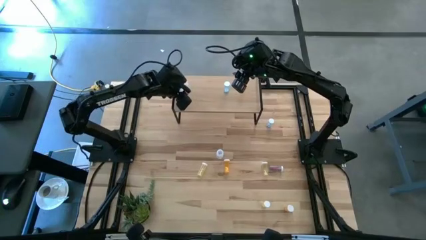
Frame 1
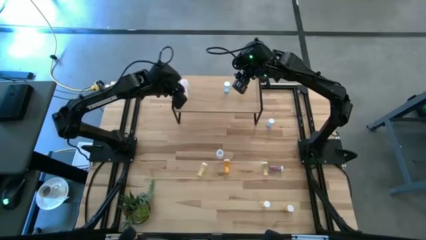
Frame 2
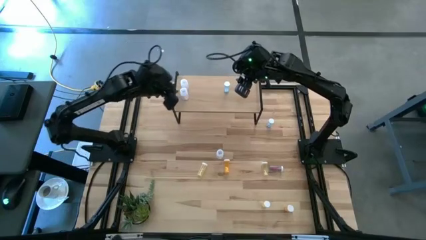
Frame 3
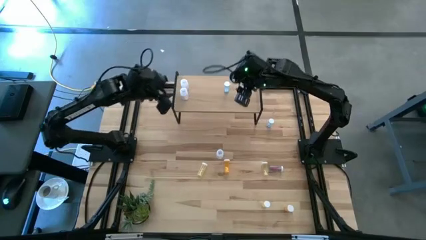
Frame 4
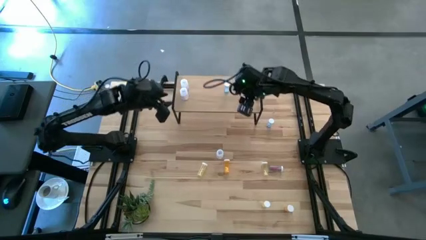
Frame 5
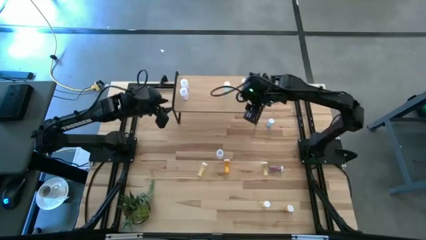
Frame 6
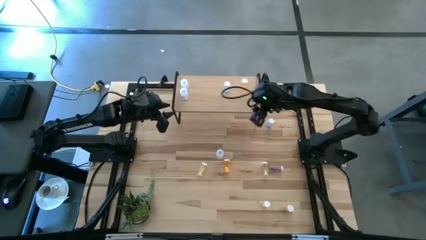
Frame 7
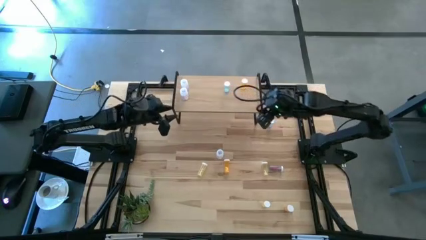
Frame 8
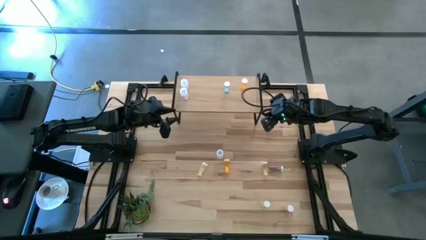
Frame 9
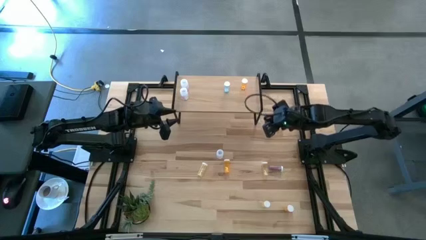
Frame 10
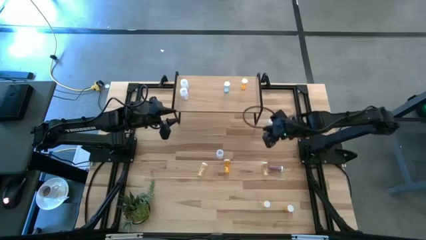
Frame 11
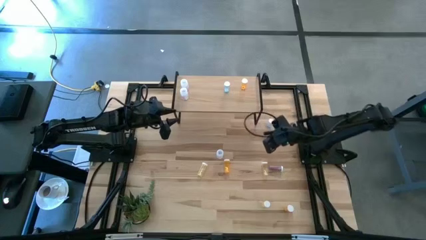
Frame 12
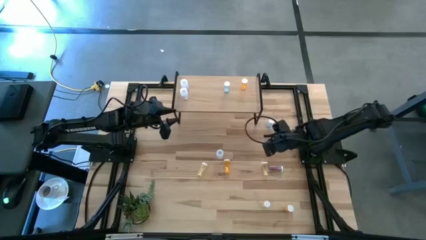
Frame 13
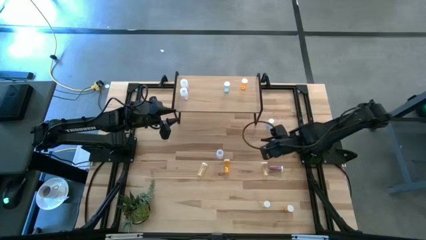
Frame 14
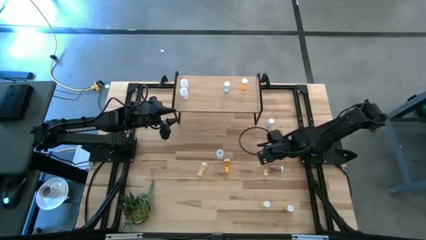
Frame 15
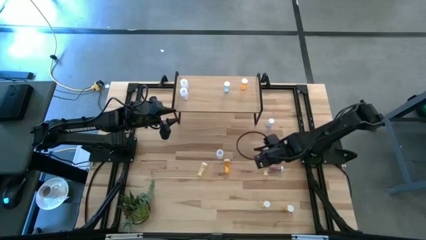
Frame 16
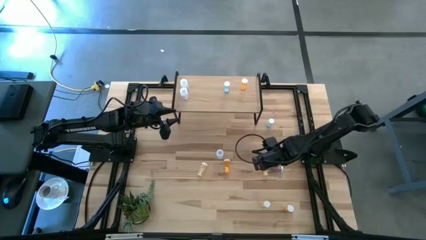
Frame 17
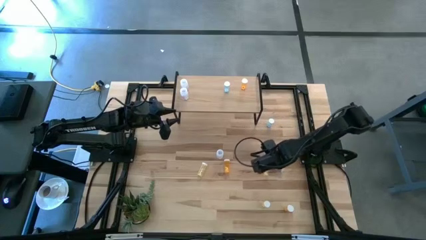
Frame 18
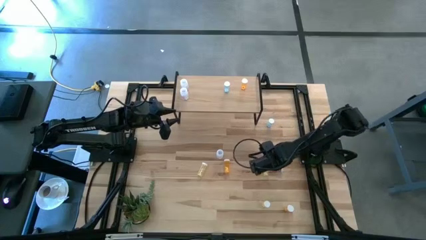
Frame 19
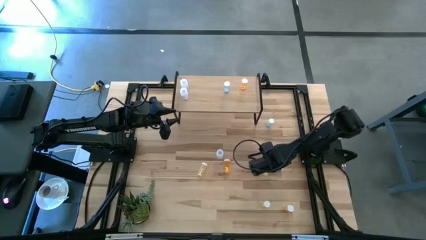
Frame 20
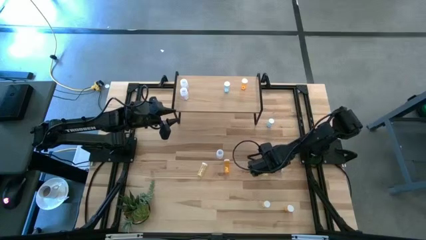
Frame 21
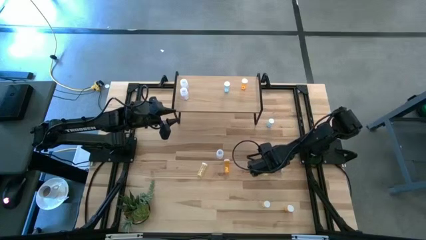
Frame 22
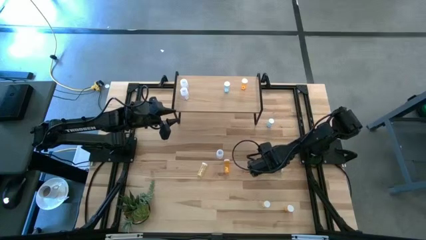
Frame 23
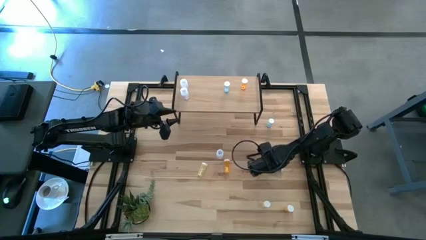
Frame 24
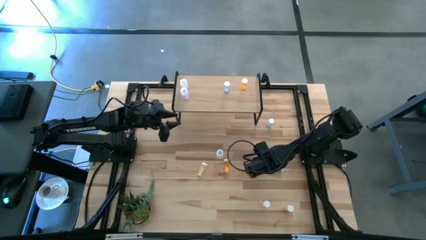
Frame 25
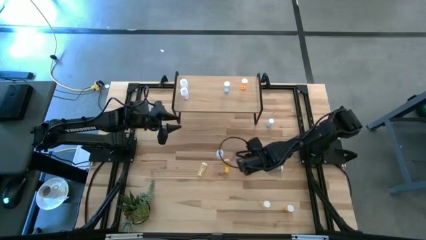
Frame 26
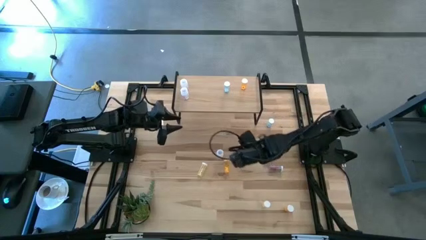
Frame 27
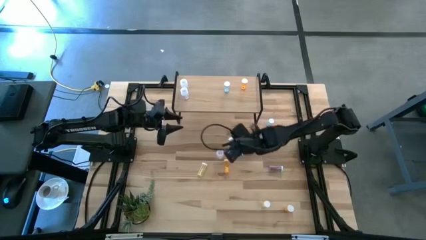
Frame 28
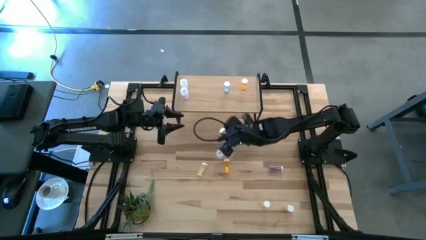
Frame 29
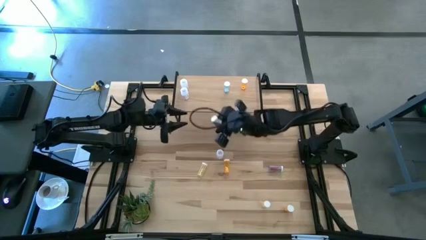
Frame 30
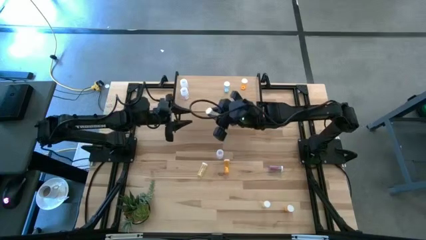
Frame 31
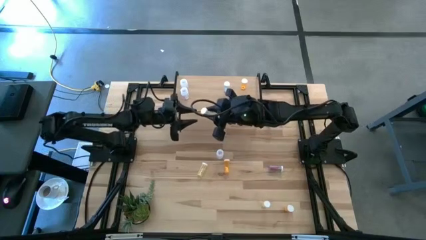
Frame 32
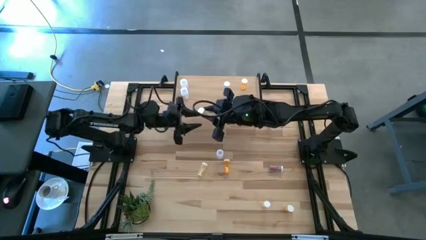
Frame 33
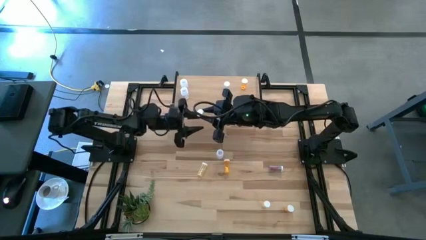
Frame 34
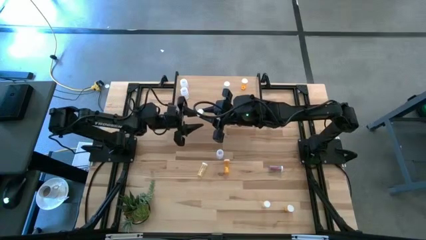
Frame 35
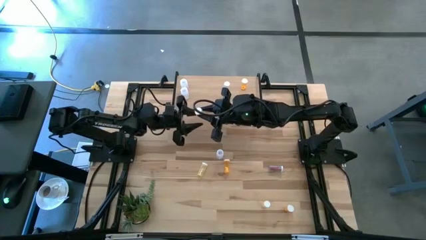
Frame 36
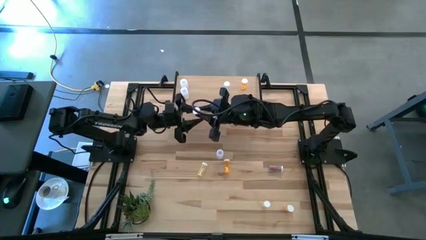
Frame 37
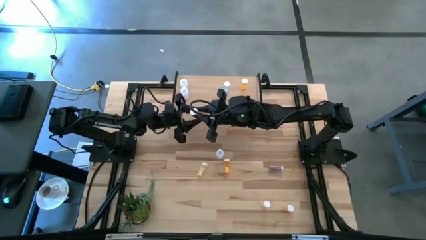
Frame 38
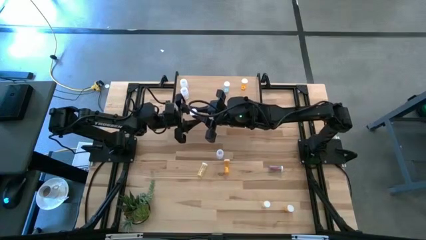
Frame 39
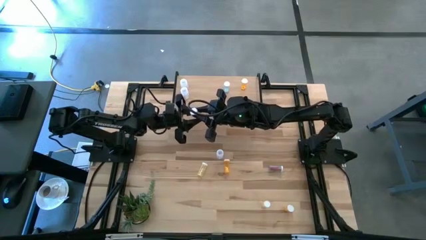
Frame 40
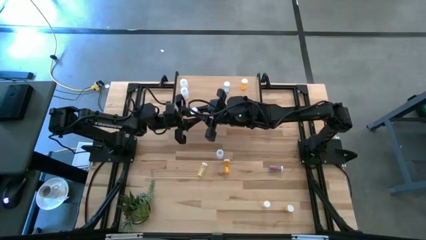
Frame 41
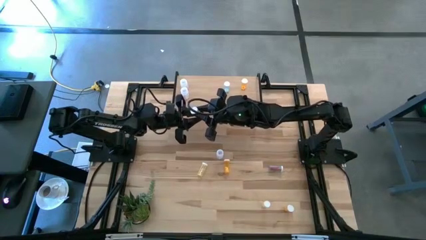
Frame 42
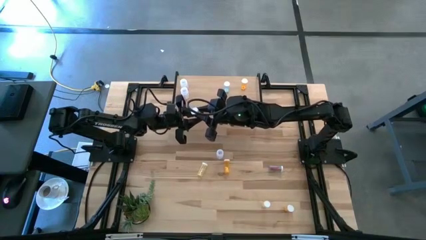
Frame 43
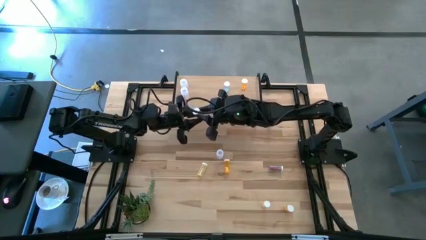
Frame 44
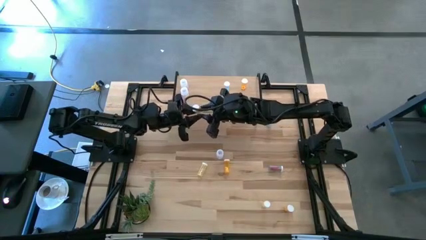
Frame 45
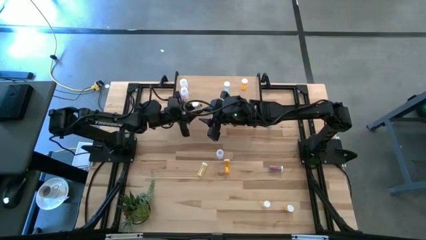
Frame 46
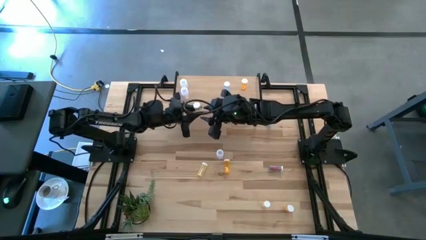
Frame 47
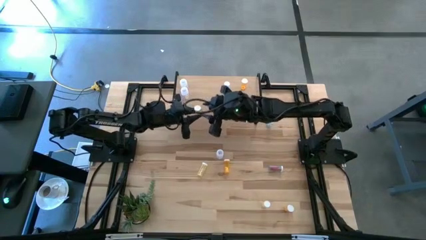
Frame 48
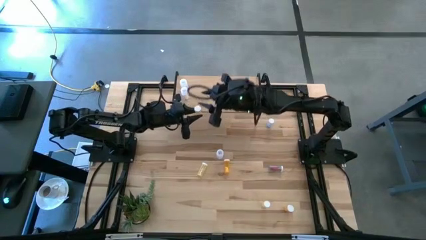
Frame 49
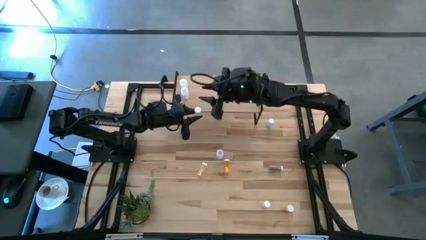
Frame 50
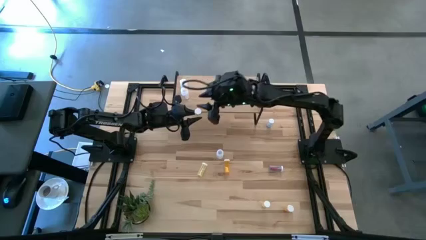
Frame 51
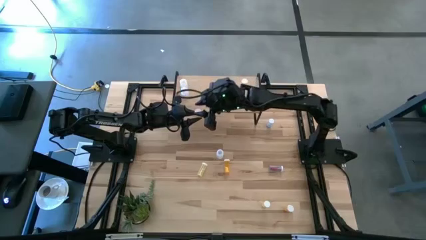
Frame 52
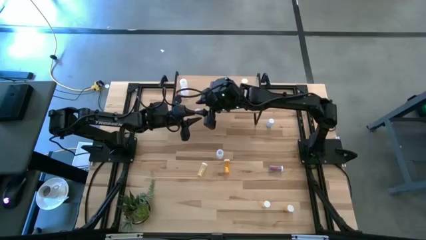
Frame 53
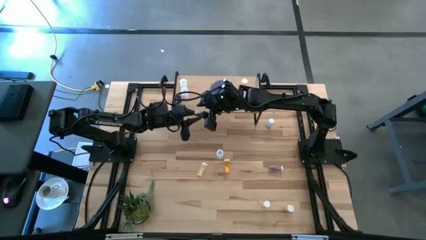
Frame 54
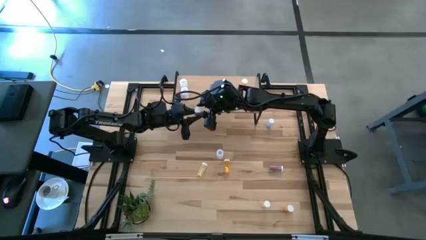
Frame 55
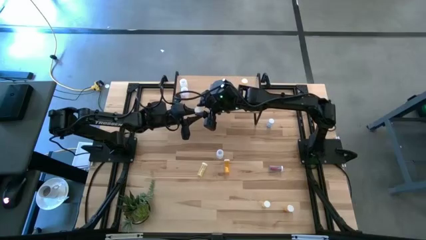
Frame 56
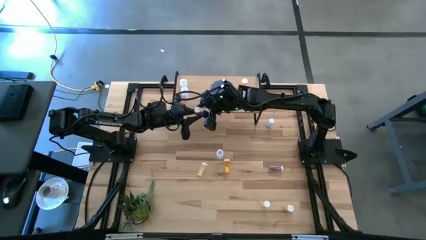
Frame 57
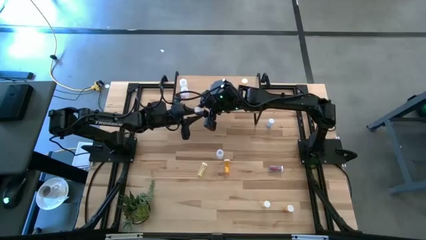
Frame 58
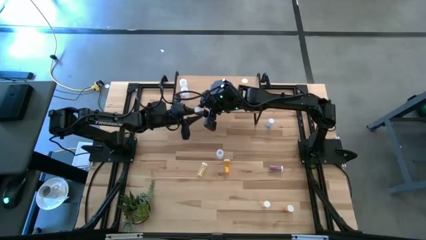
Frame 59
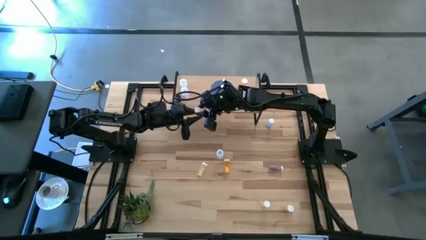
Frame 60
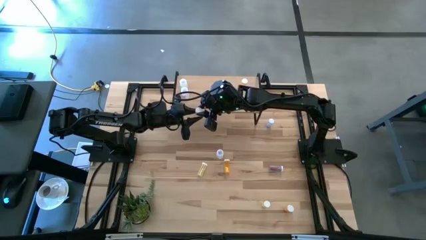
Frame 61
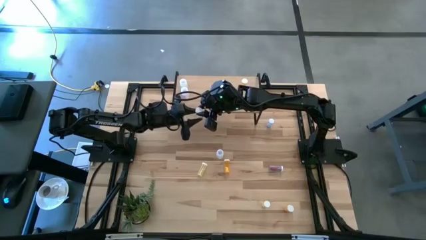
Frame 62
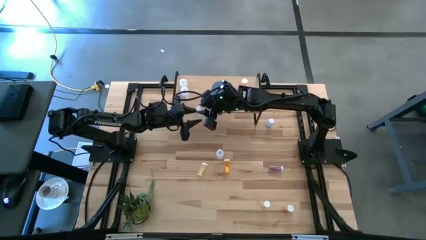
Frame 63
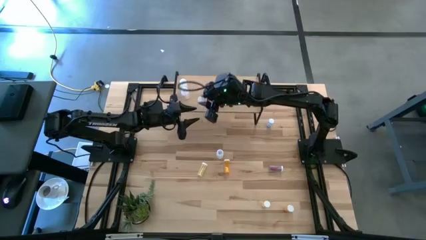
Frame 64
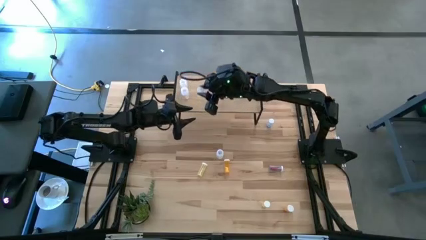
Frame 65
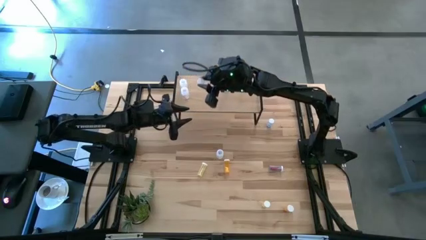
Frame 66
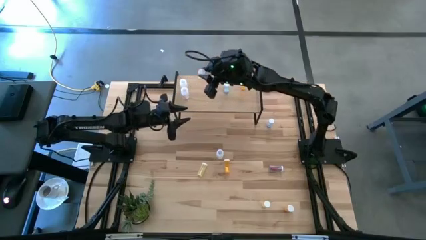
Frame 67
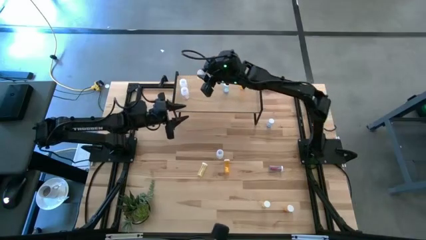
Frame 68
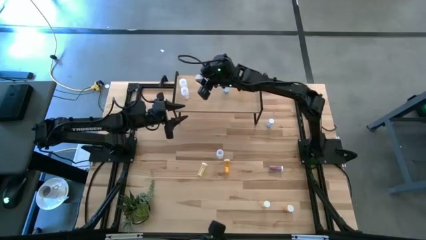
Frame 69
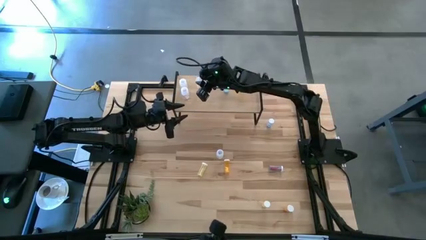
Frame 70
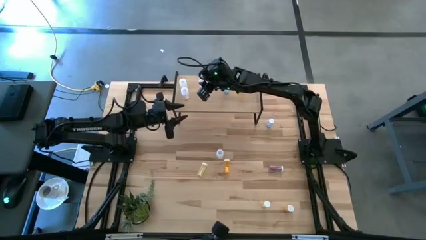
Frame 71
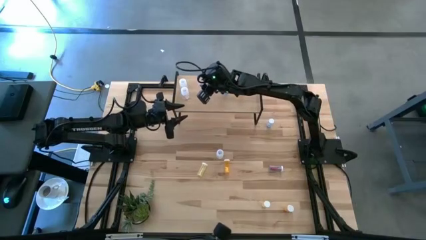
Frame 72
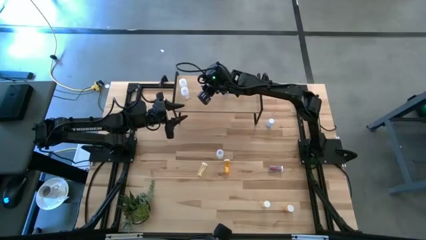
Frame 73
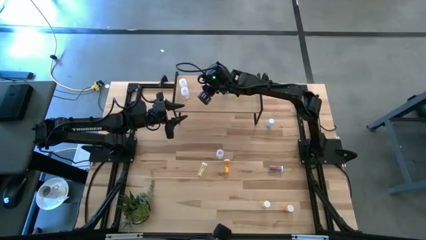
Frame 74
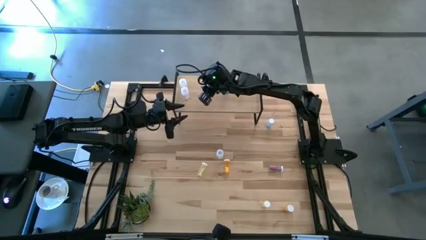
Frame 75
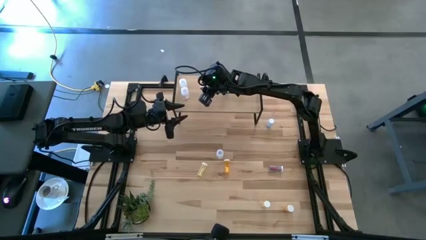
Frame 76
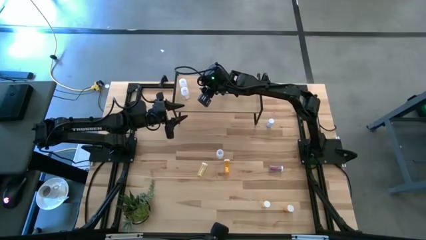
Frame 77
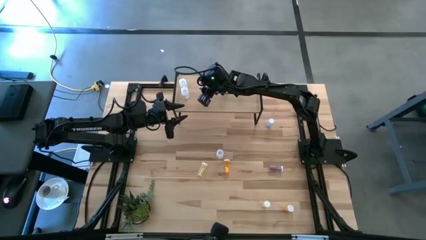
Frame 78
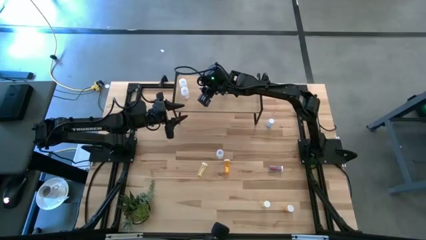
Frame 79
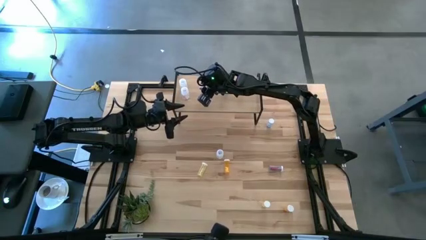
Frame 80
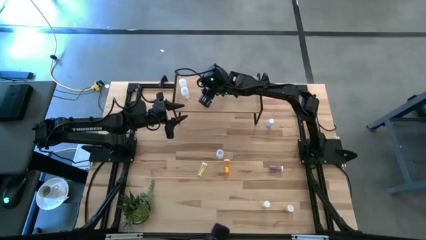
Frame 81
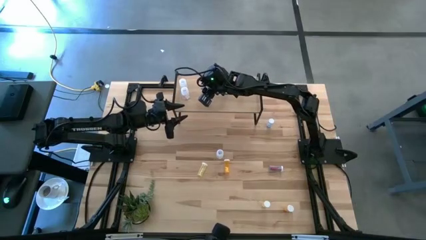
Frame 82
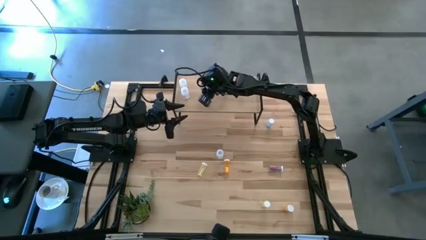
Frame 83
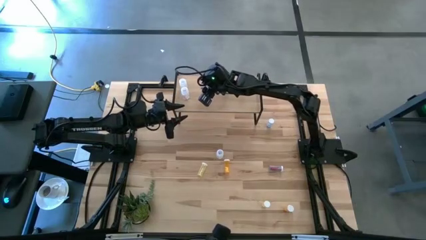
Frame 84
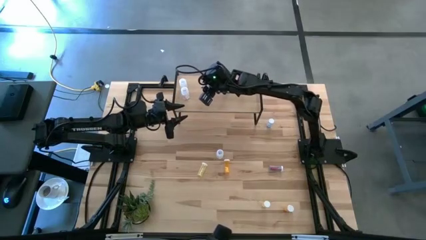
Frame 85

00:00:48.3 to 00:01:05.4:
Task: Pick and place medicine bottles onto shelf by color
Put the top right yellow pill bottle on the shelf
